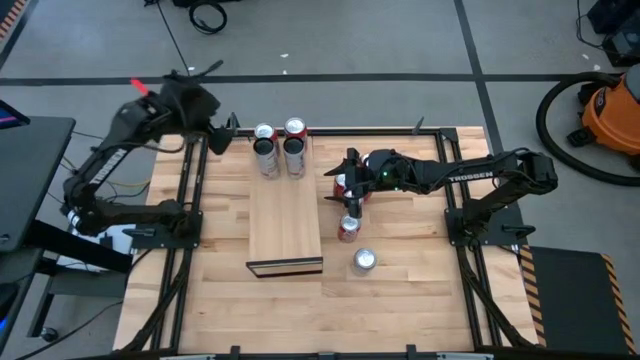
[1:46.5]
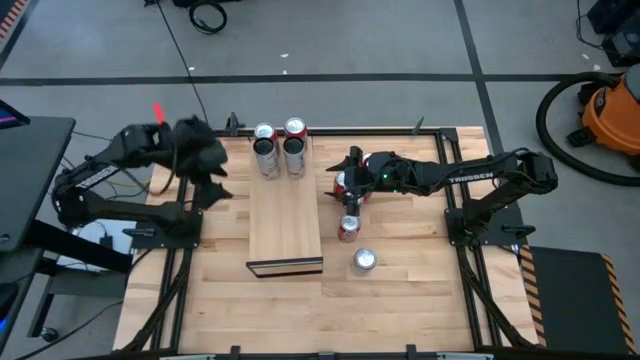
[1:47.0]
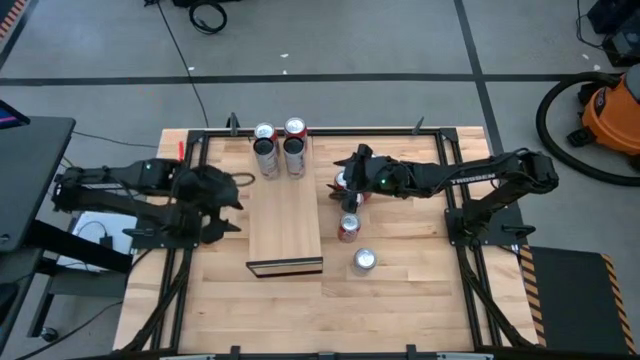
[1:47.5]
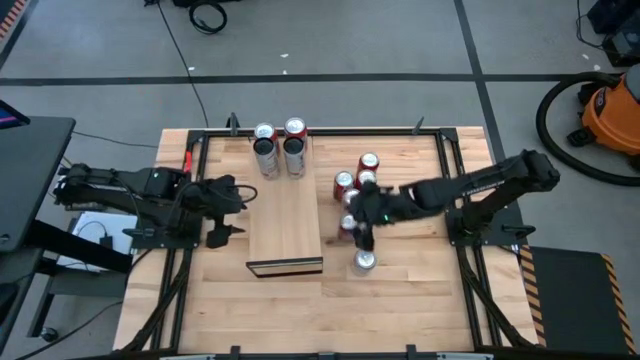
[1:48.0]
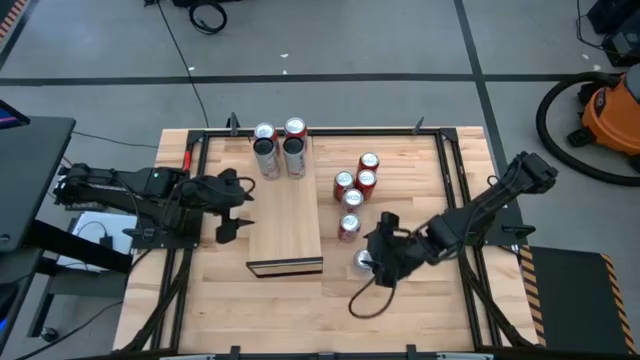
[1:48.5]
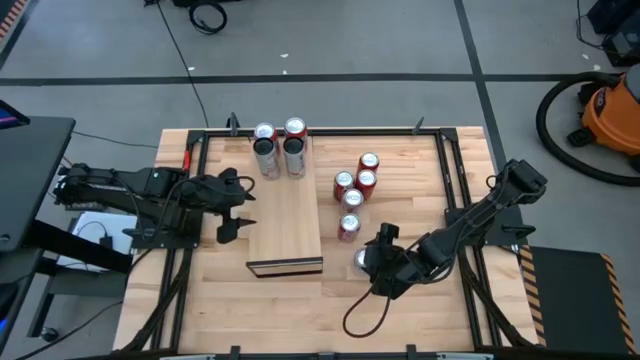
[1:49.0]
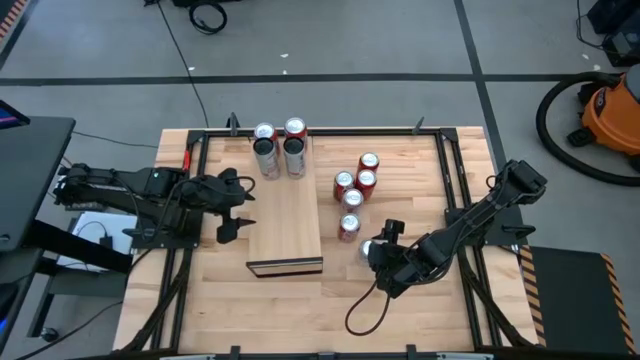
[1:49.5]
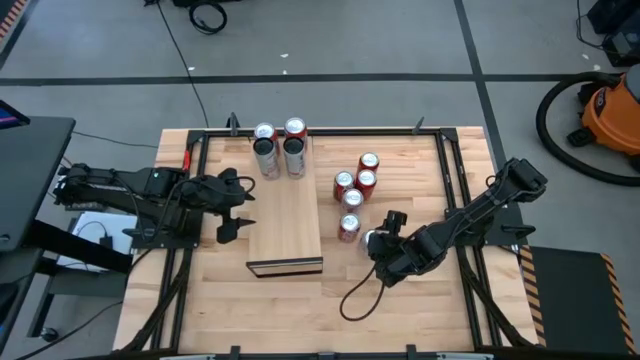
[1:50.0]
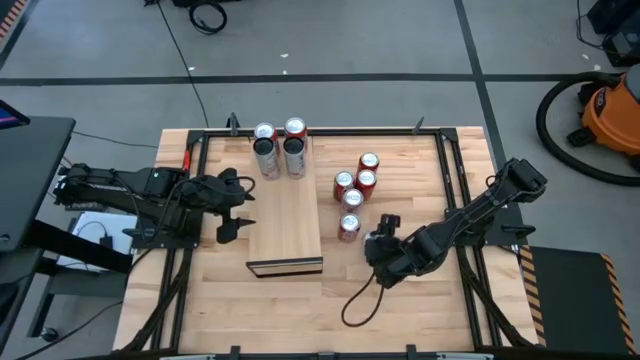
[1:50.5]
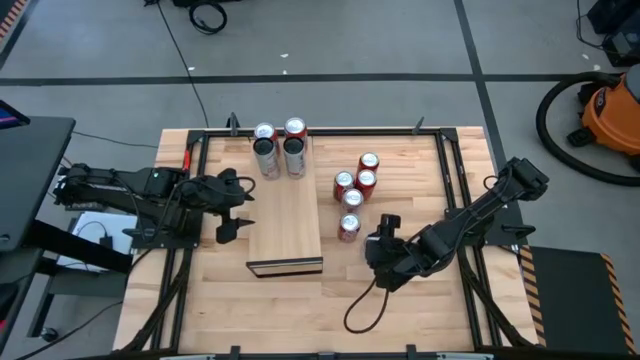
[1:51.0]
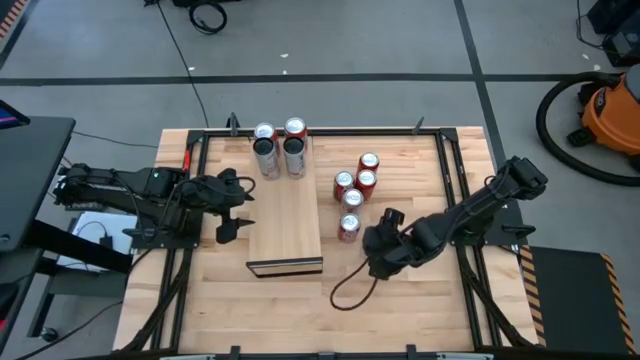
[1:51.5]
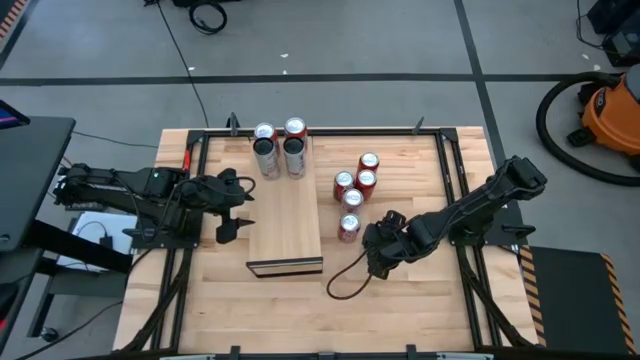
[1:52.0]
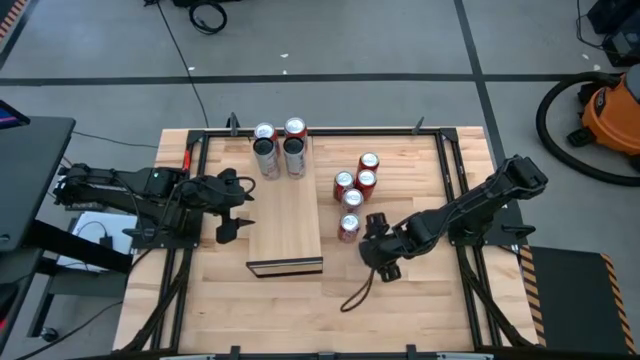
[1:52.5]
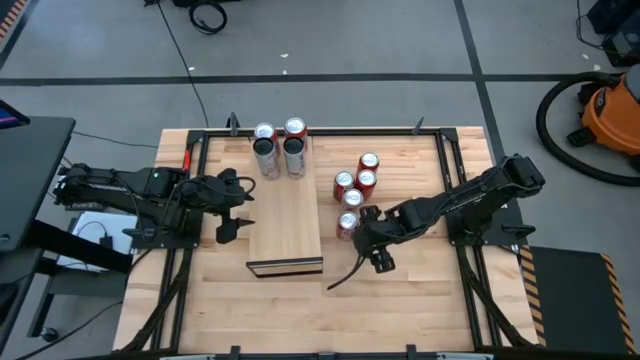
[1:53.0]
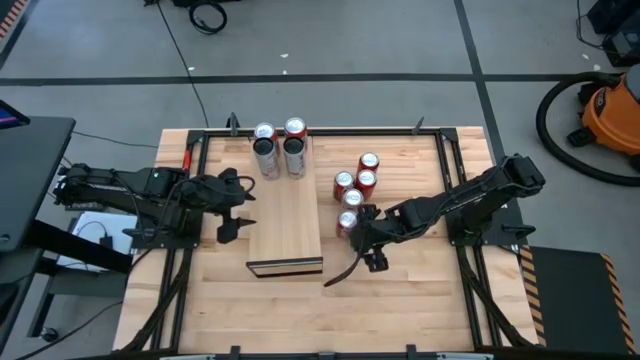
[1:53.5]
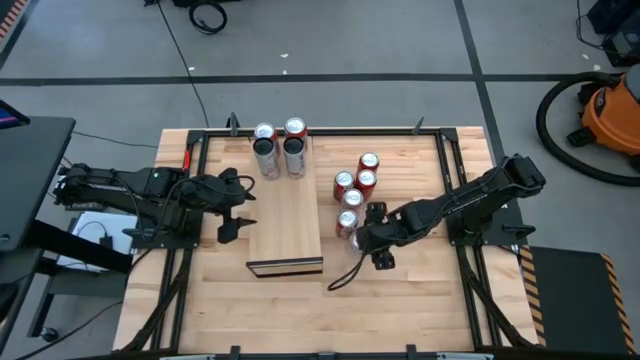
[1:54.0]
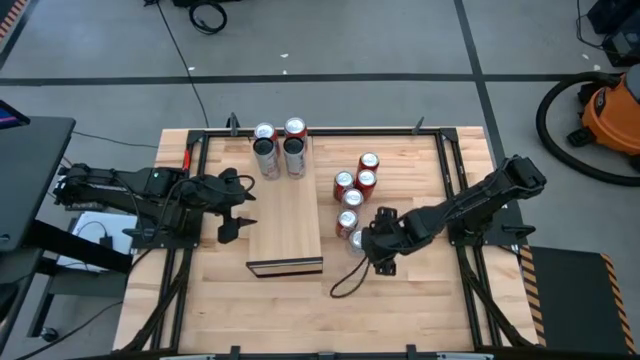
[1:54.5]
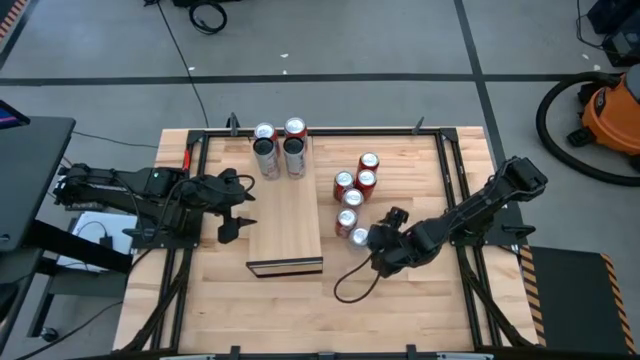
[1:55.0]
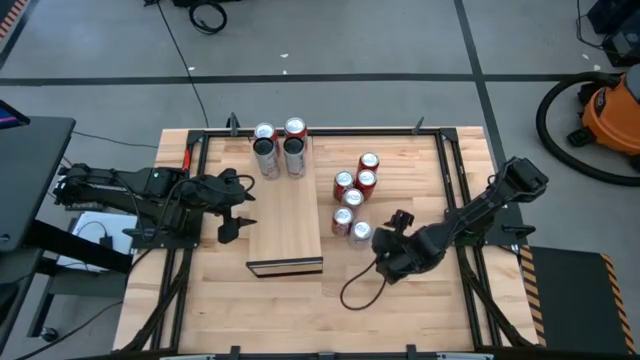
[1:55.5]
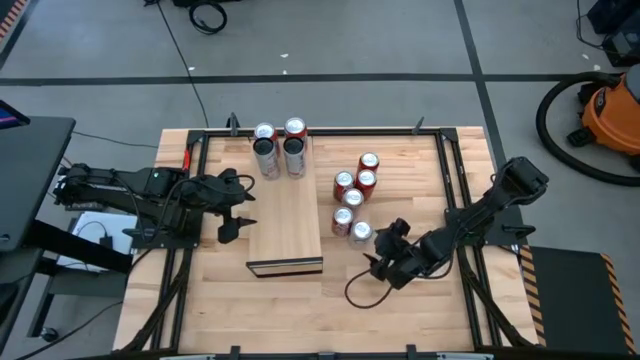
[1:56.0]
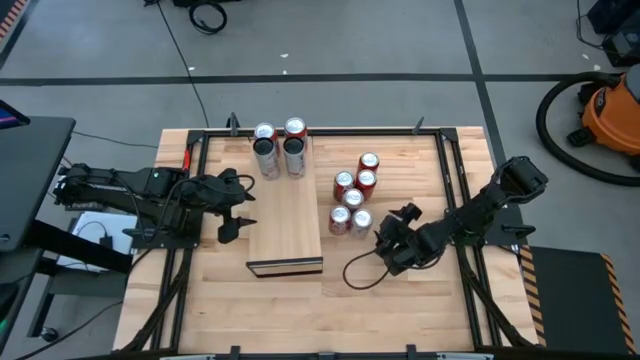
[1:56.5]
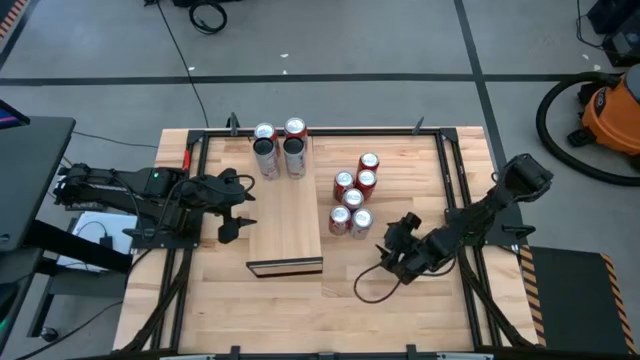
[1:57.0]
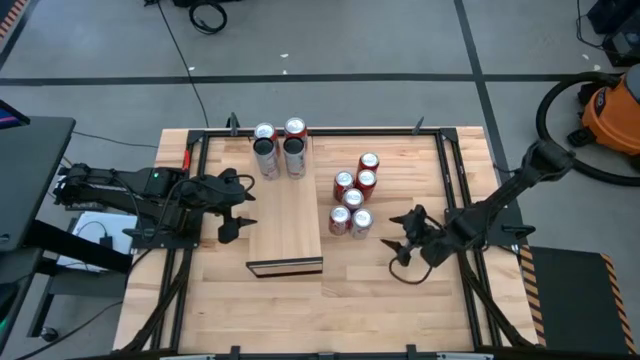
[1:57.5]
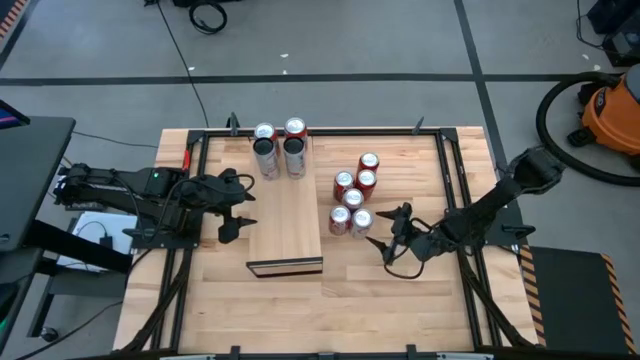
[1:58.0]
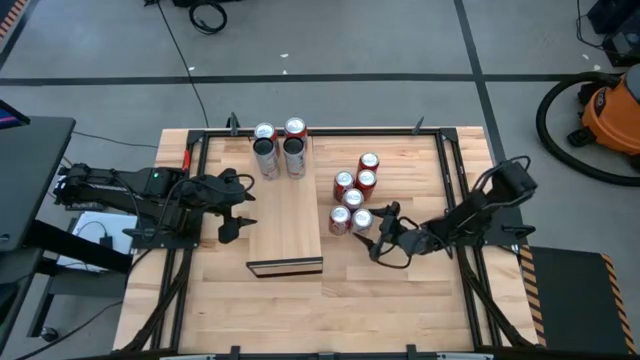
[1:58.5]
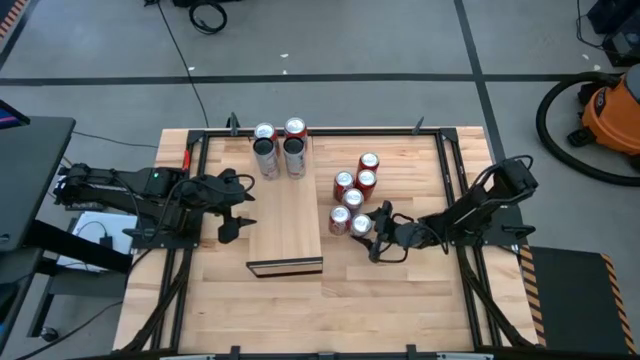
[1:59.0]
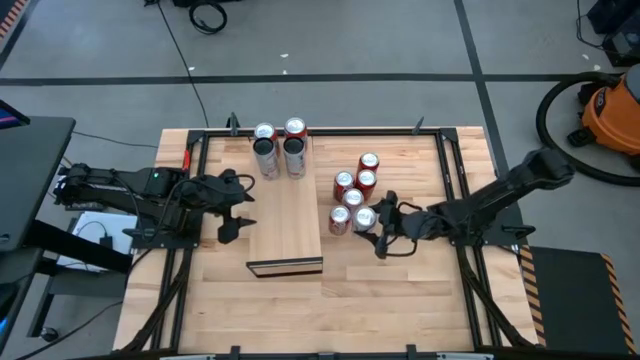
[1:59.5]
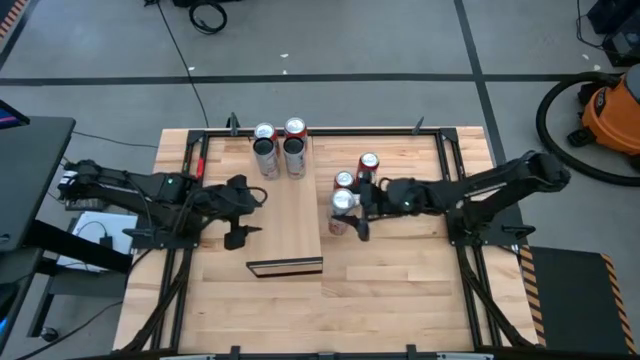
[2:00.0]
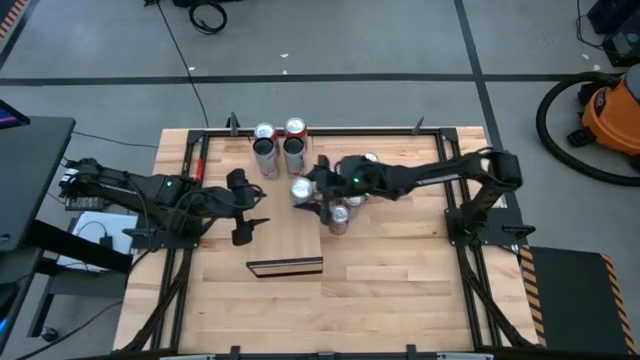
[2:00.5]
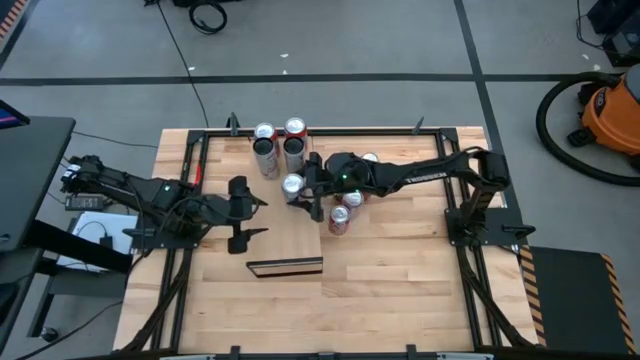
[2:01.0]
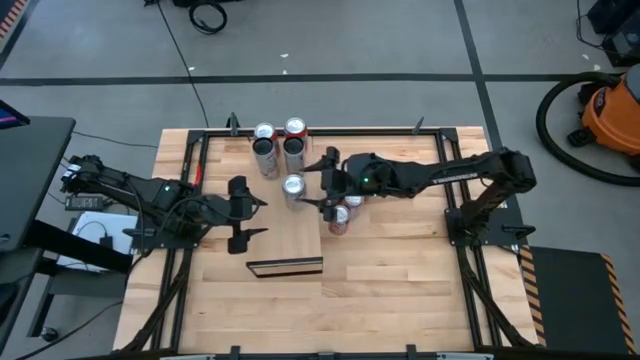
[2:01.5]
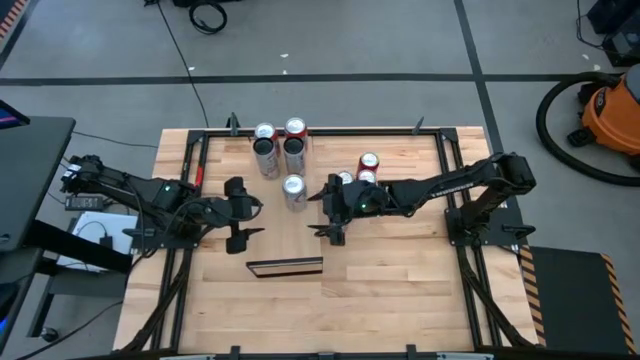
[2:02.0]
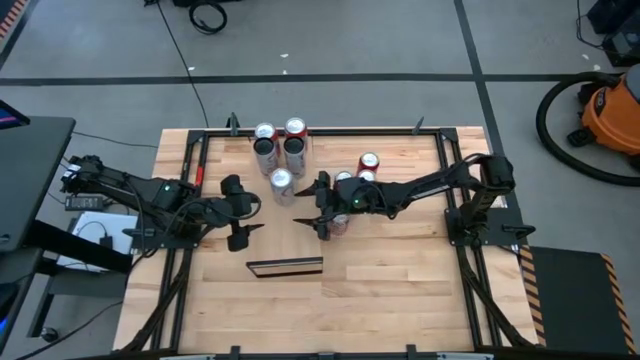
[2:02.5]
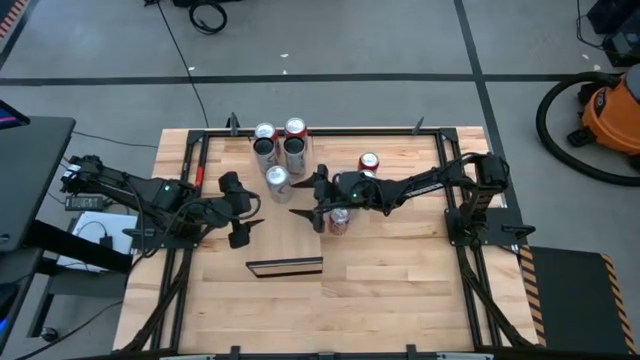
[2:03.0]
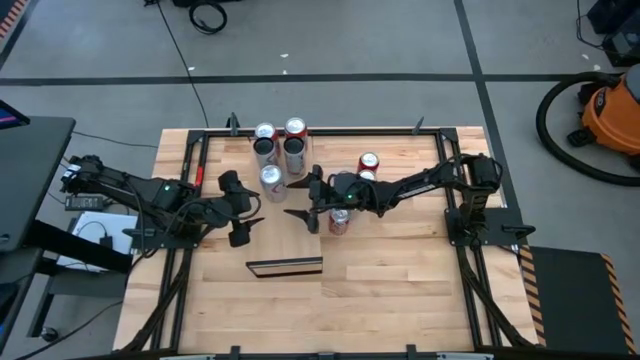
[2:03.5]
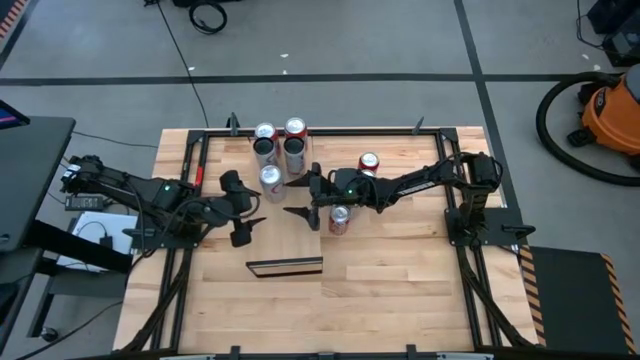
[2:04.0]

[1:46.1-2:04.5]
Task: Place canned beverage on shelf
Put the bottom red-silver soda can on the shelf

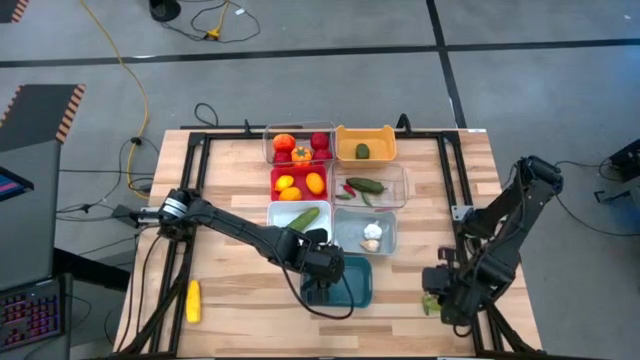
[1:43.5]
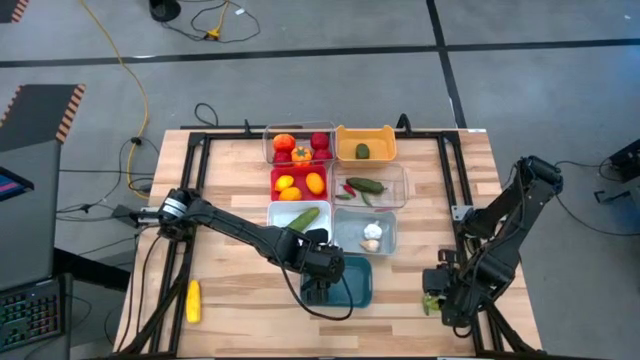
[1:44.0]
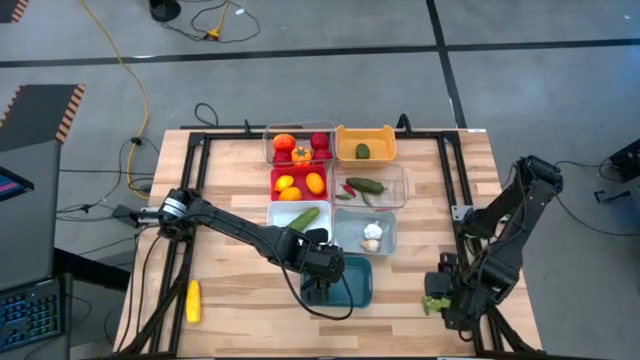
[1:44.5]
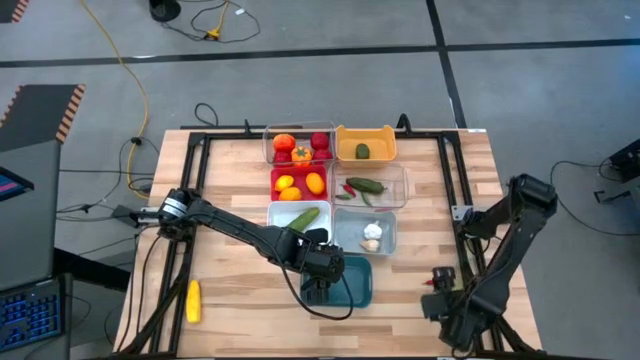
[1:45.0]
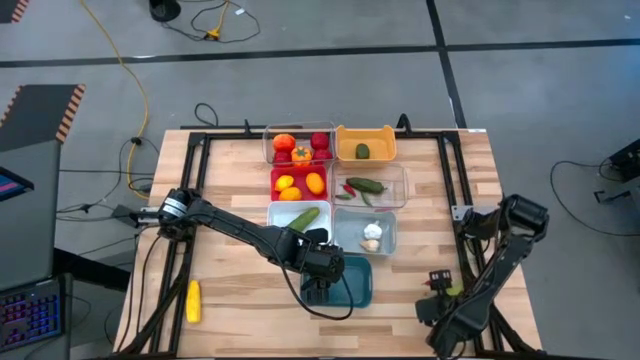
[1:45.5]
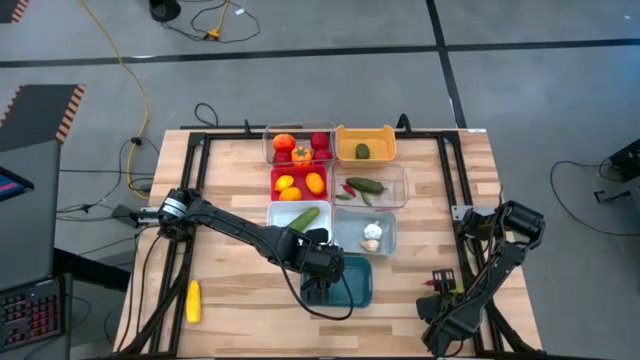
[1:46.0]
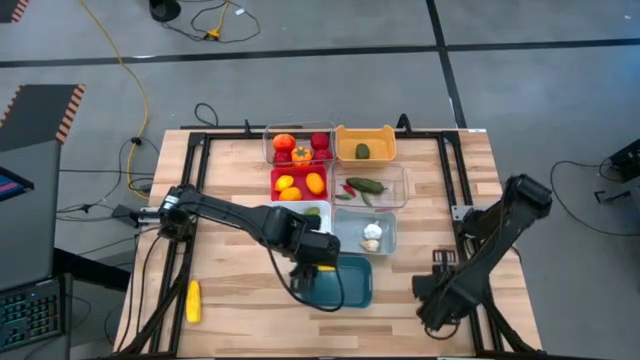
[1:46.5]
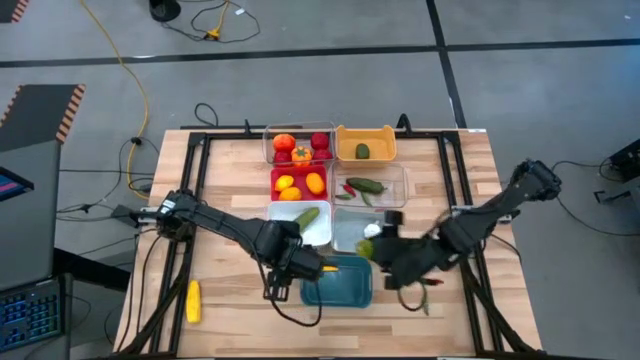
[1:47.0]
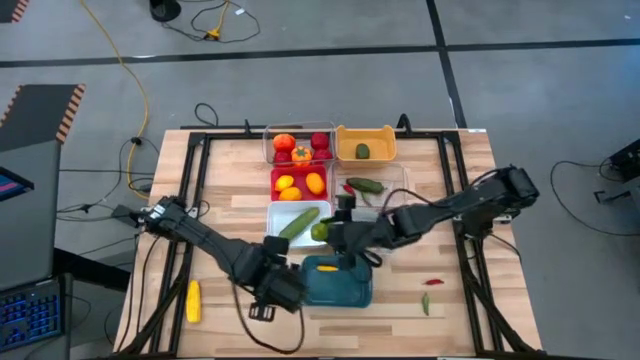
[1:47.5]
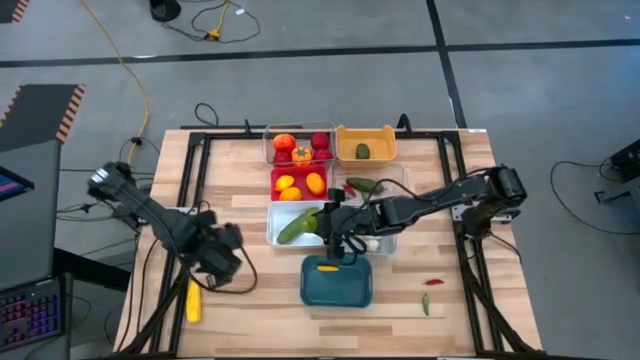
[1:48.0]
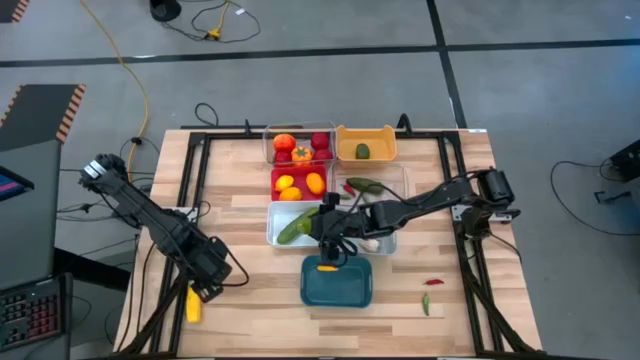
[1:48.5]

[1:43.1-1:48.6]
Task: Sort produce into baskets
Put the green cucumber into the white bin
